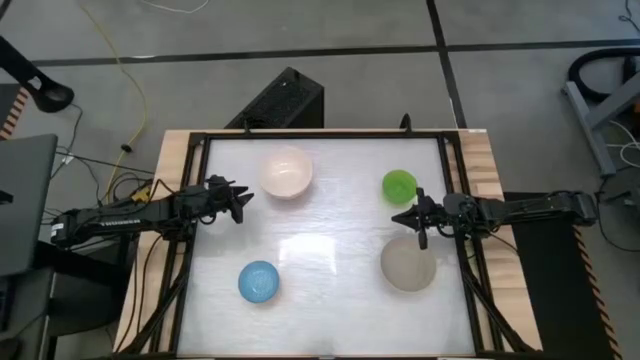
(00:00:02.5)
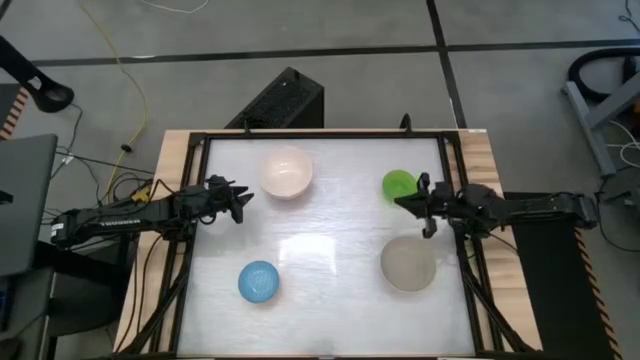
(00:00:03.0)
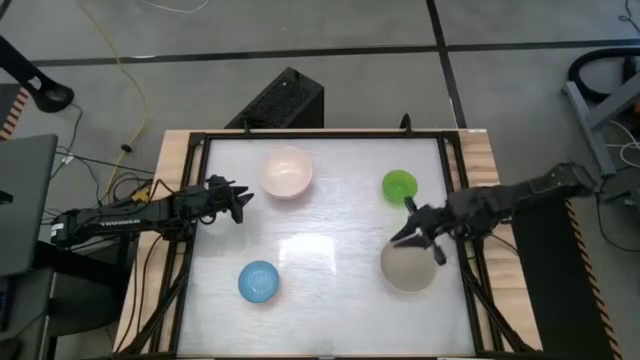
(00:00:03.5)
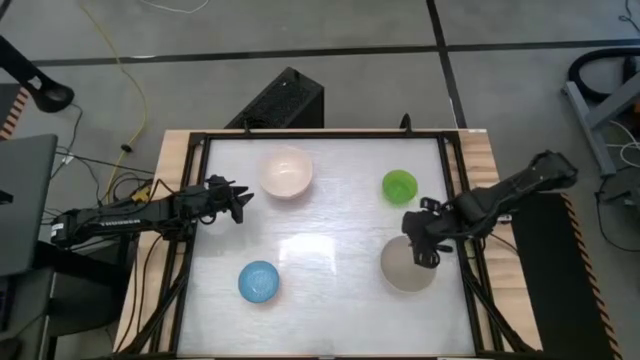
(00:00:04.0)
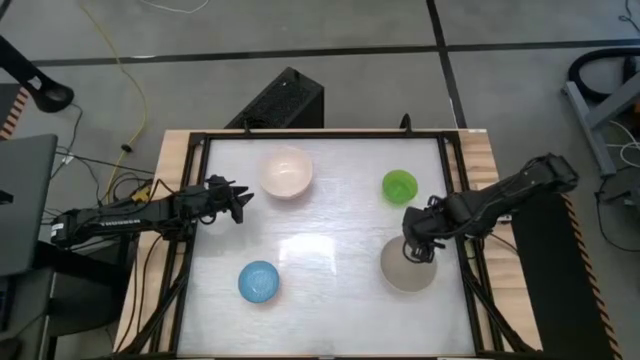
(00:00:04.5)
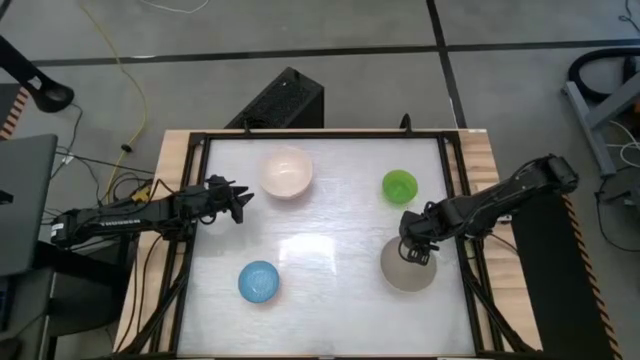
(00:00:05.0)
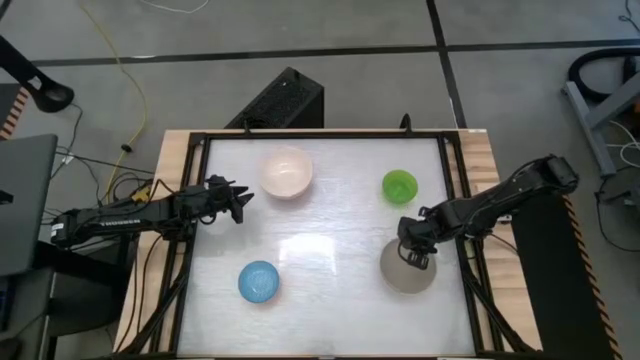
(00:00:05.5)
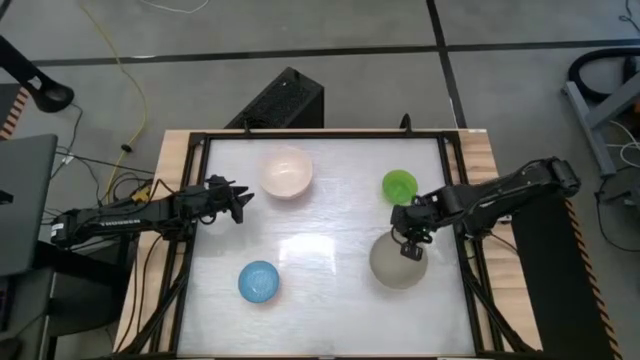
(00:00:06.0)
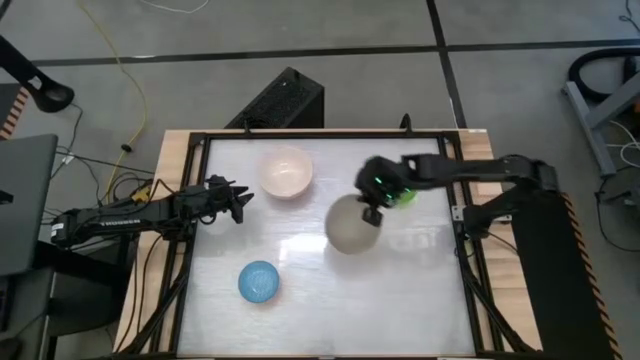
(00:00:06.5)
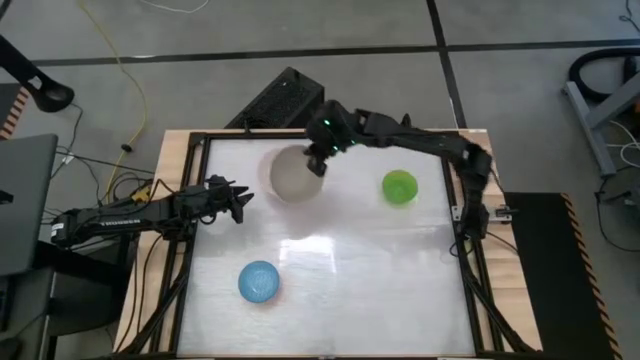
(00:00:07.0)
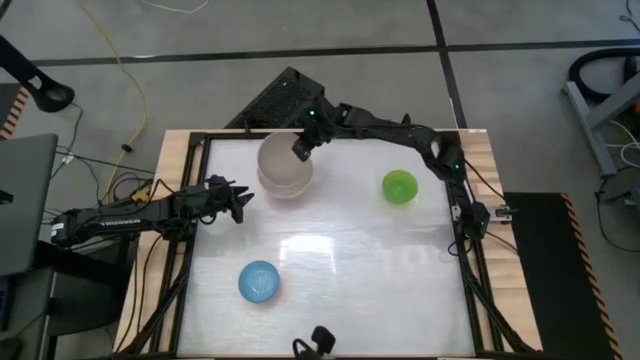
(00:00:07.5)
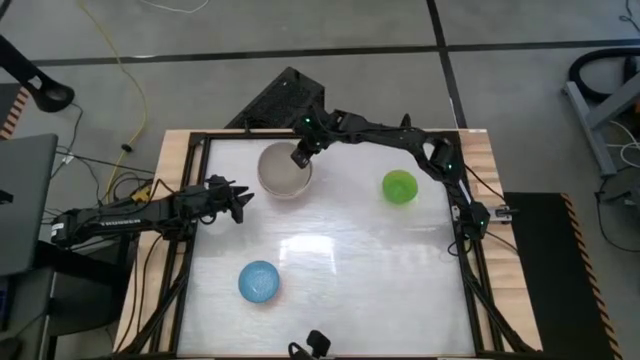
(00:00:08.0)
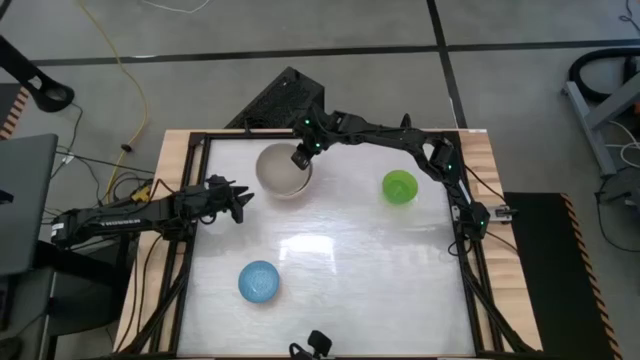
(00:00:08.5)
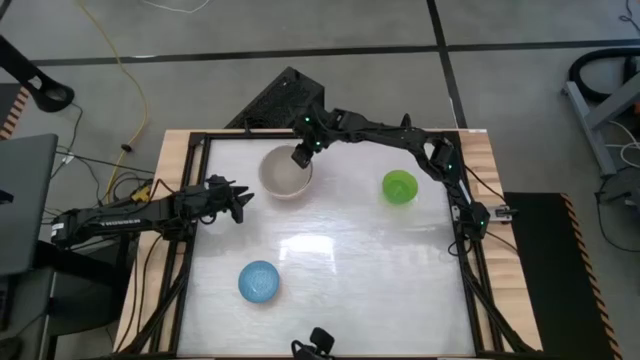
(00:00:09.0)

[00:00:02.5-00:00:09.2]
Stack the gray bowl on top of the white bowl

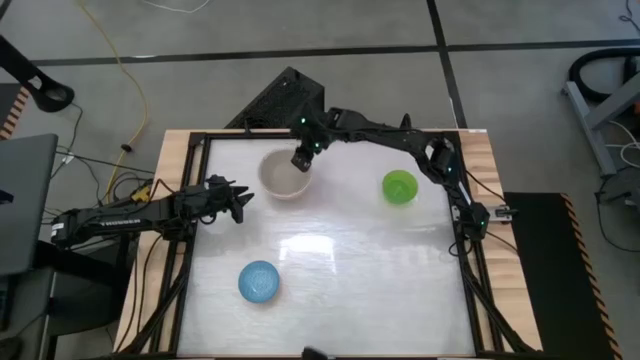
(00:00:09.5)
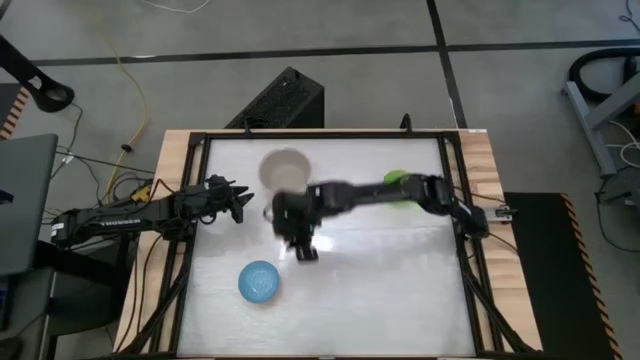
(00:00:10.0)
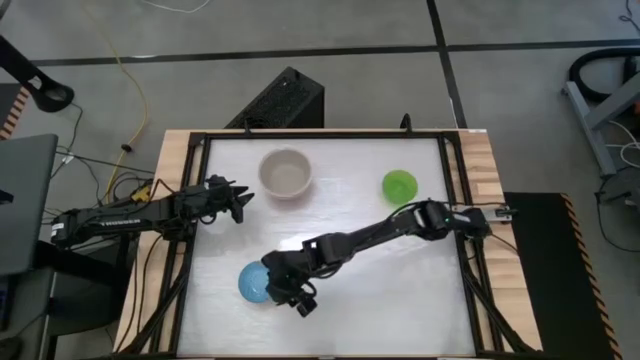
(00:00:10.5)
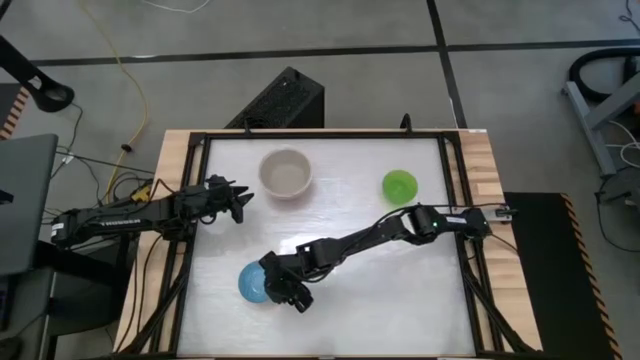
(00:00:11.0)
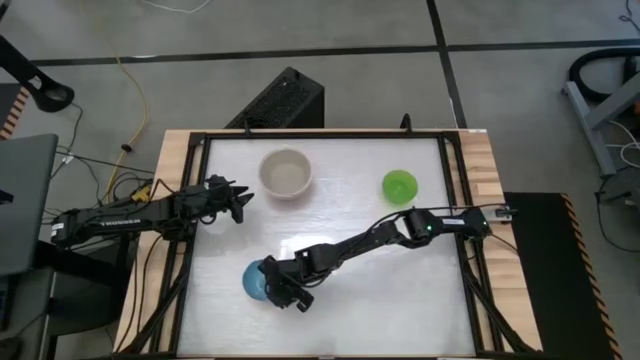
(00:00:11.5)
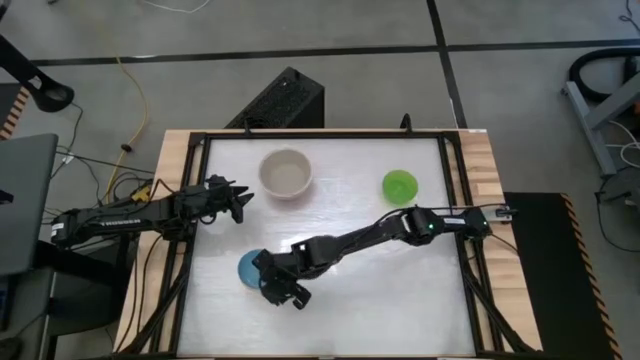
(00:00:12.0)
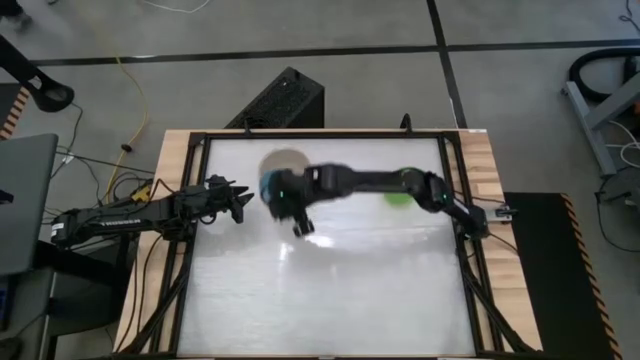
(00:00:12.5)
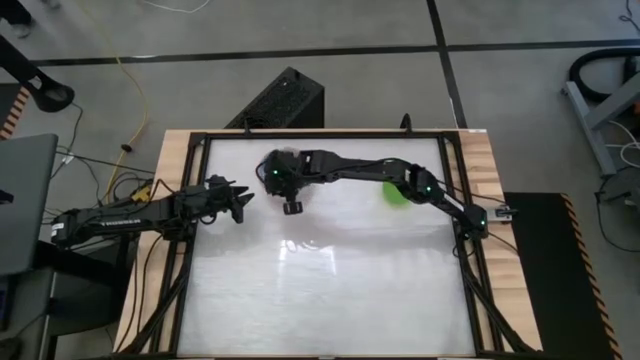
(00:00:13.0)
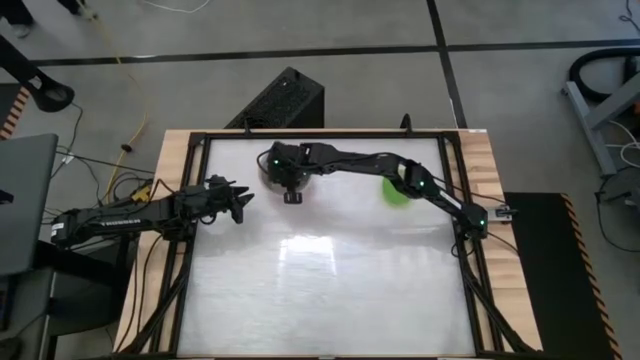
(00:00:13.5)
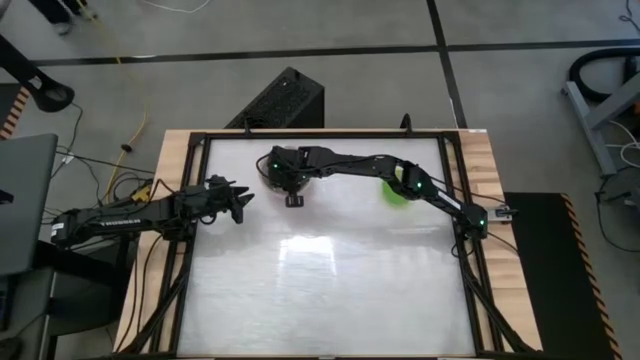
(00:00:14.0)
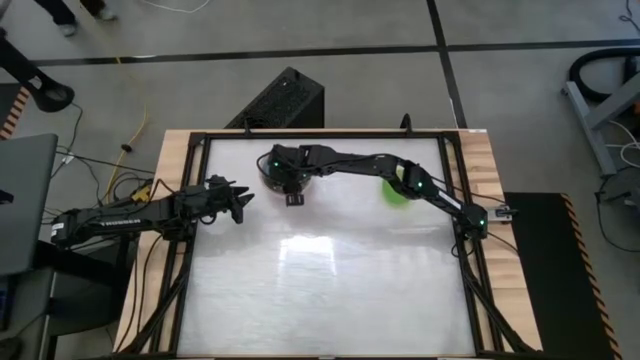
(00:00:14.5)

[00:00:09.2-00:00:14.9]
Stack the blue bowl on top of the gray bowl

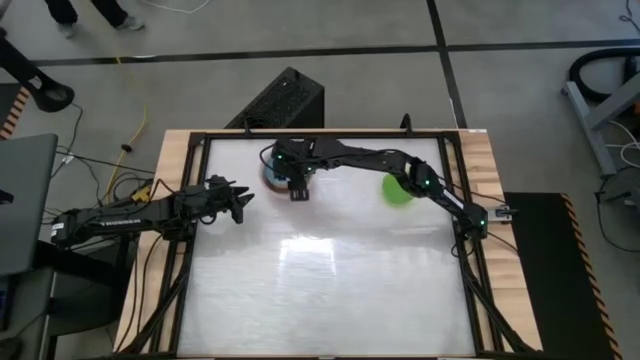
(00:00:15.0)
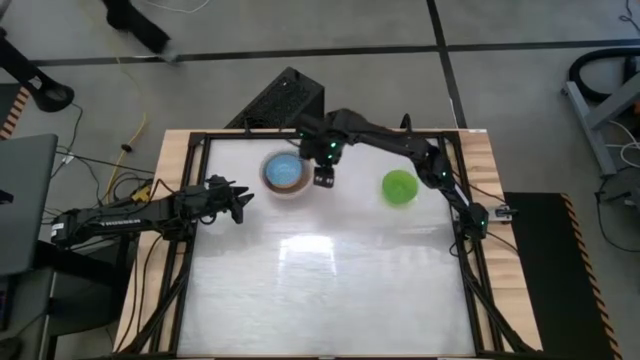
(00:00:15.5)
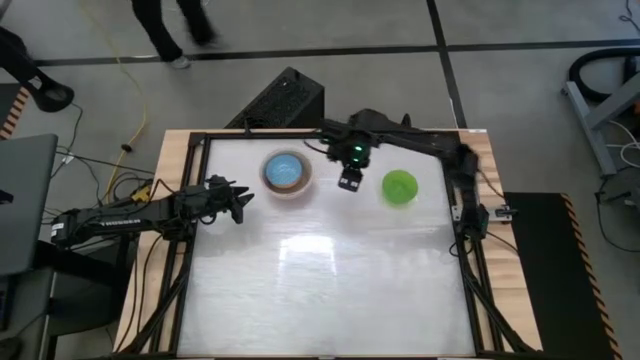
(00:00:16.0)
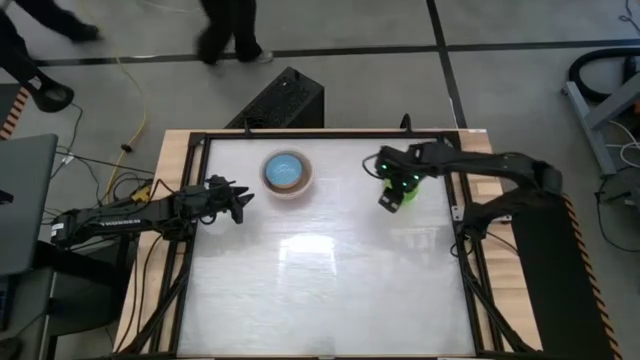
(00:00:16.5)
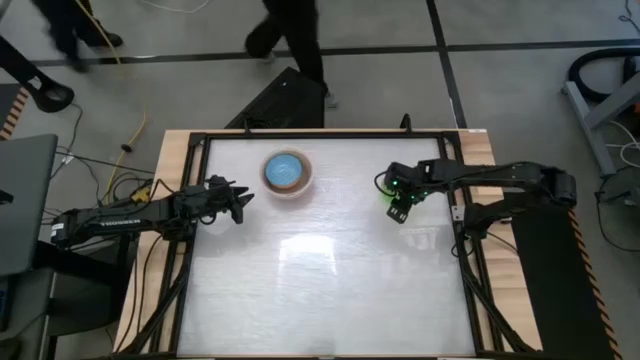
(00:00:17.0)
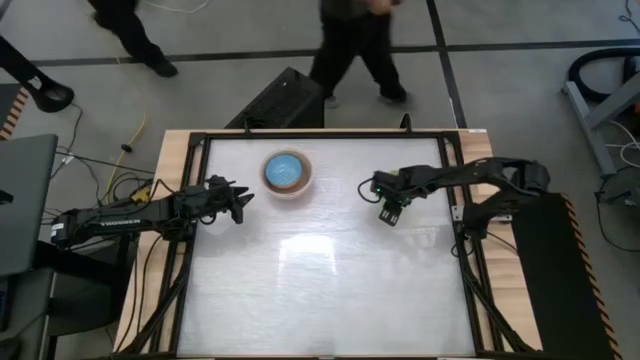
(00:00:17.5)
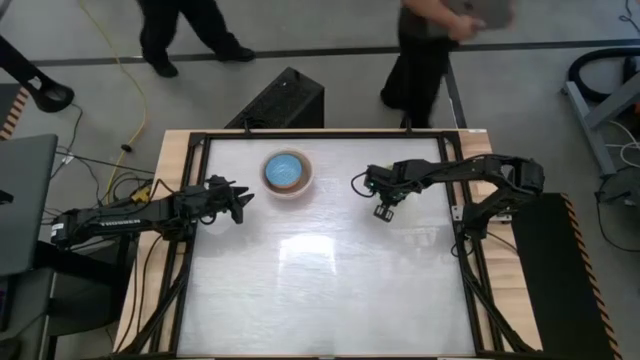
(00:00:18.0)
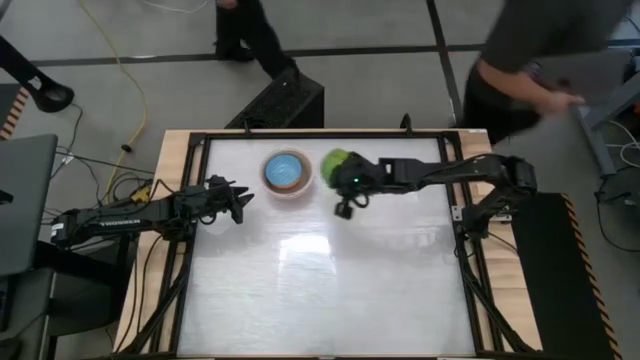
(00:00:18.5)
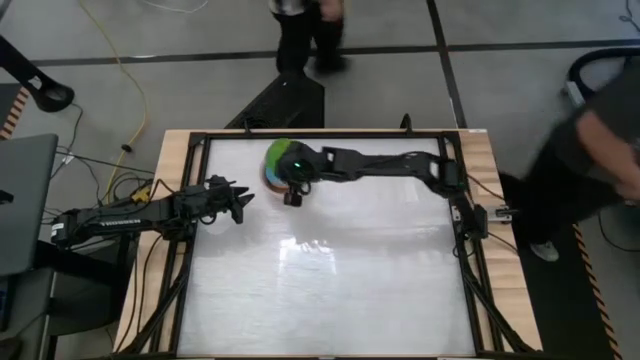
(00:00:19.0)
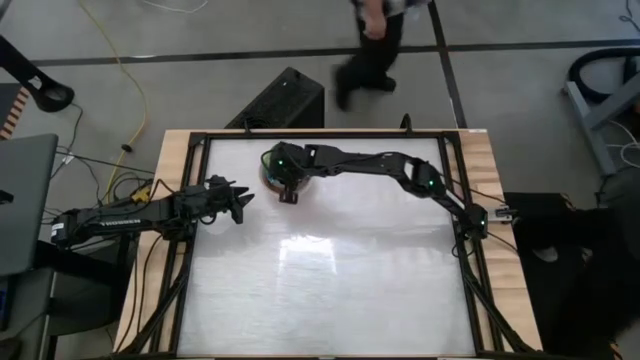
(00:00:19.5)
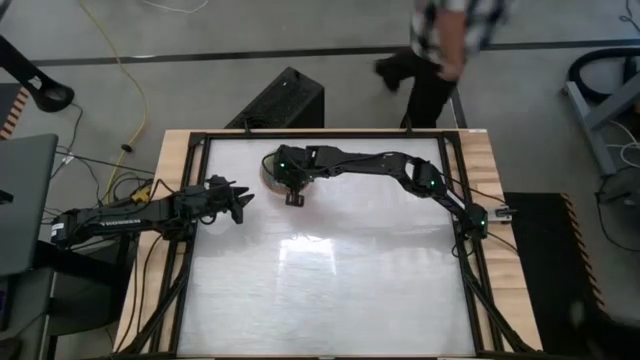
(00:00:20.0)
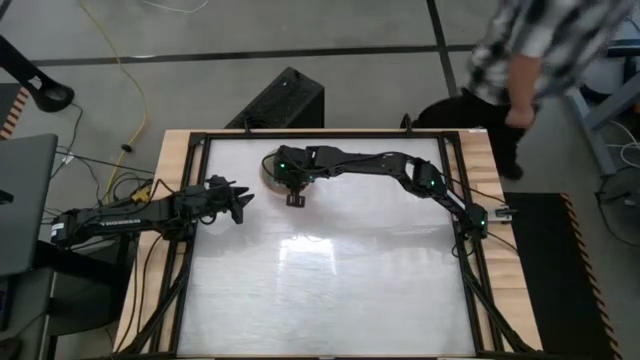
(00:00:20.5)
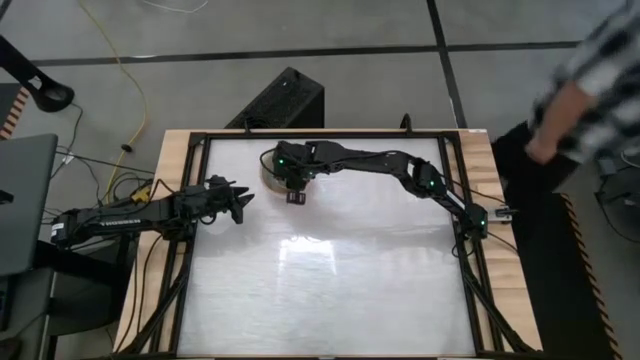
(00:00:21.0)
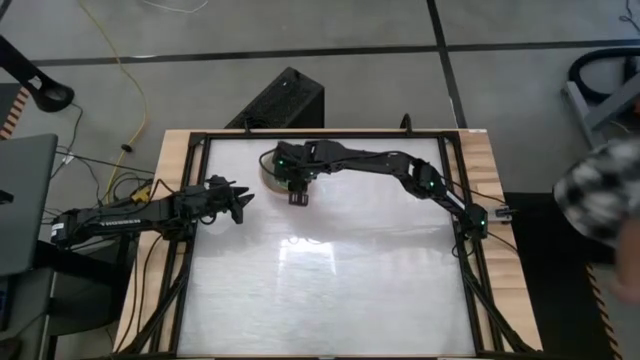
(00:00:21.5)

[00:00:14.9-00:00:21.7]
Stack the green bowl on top of the blue bowl
